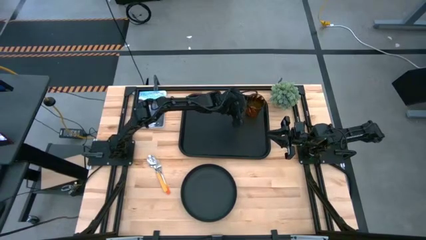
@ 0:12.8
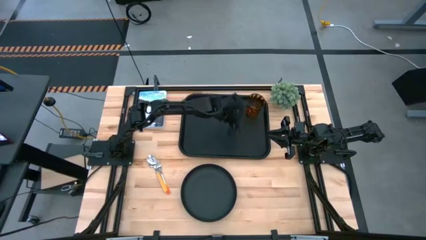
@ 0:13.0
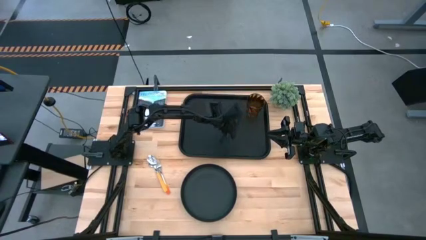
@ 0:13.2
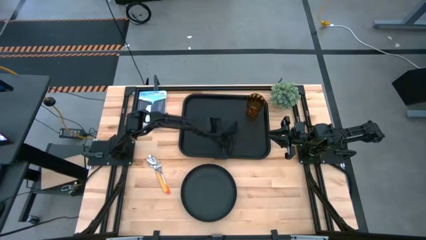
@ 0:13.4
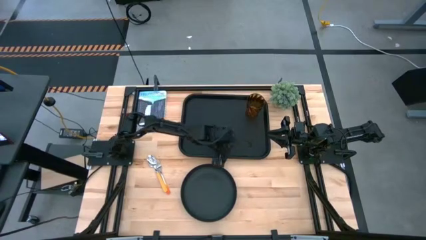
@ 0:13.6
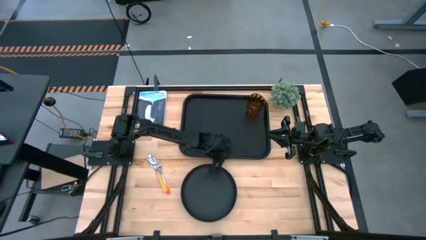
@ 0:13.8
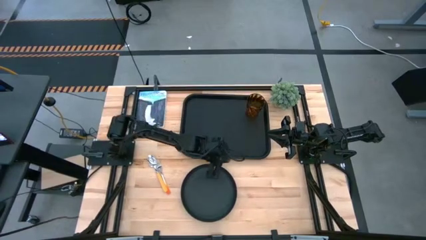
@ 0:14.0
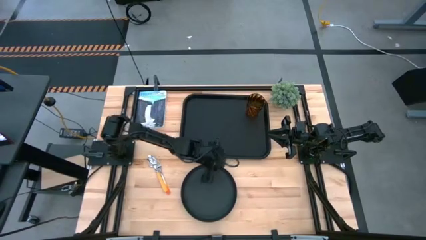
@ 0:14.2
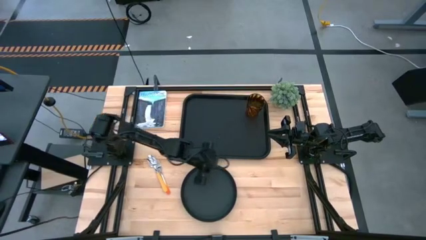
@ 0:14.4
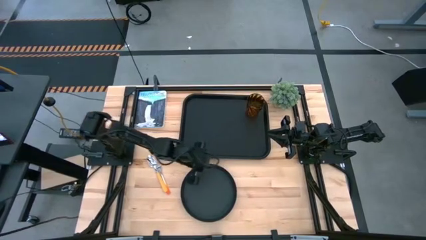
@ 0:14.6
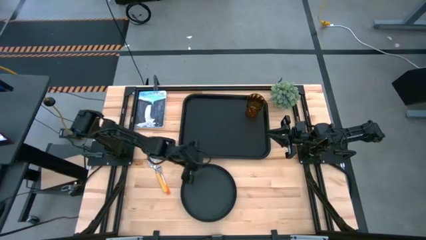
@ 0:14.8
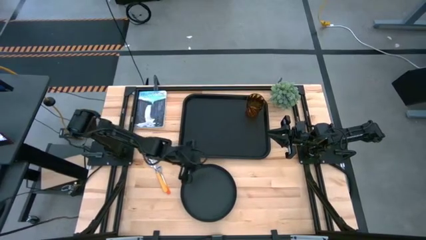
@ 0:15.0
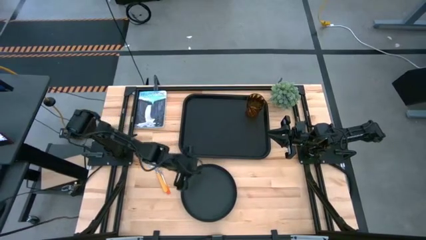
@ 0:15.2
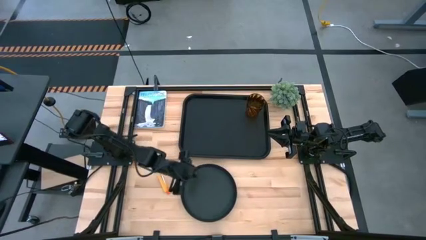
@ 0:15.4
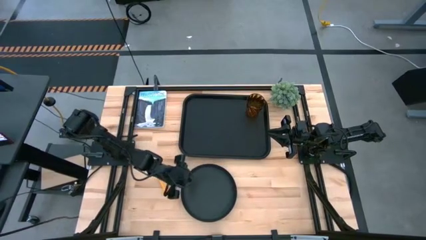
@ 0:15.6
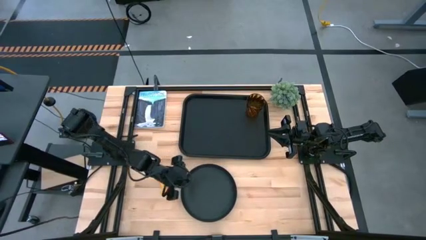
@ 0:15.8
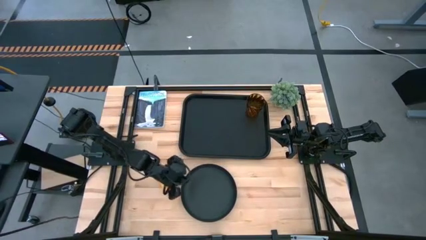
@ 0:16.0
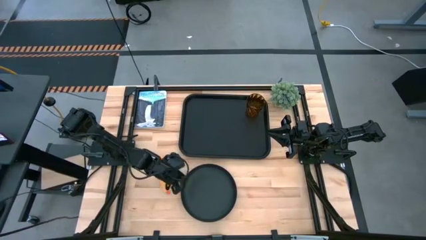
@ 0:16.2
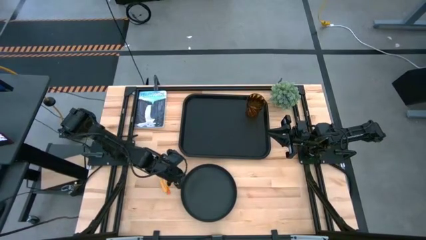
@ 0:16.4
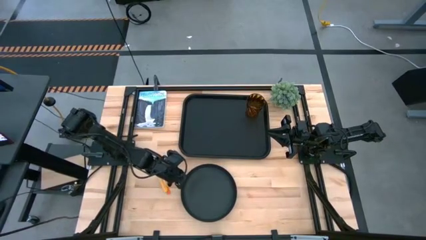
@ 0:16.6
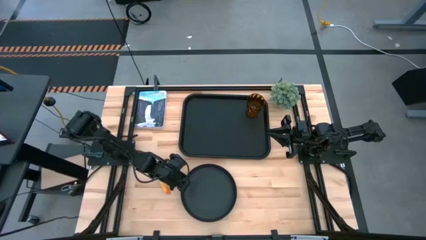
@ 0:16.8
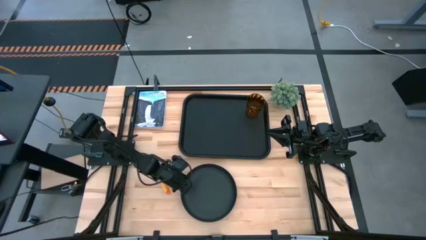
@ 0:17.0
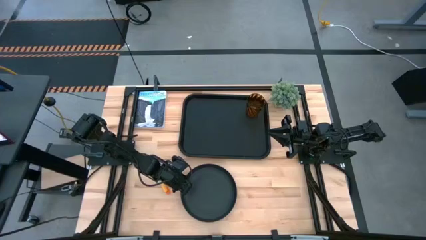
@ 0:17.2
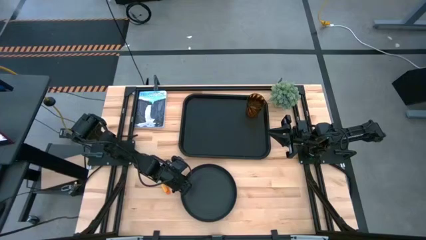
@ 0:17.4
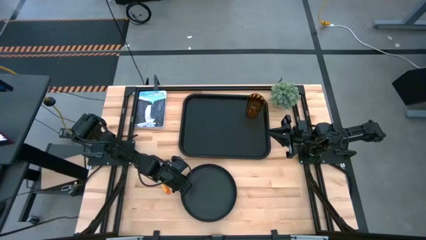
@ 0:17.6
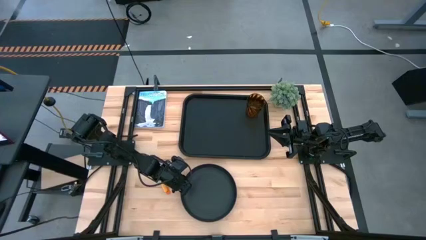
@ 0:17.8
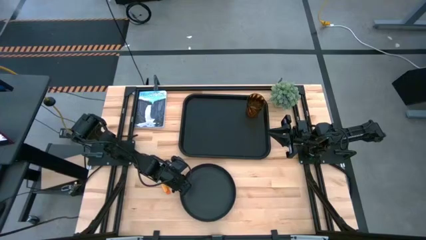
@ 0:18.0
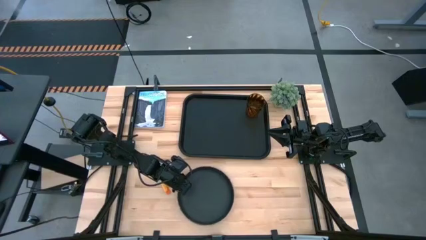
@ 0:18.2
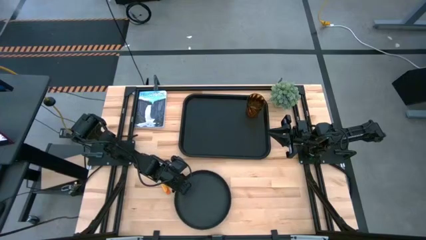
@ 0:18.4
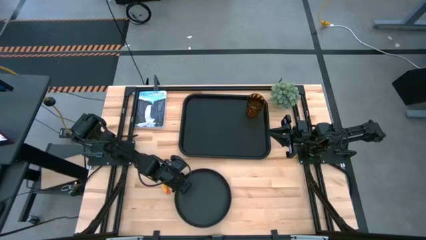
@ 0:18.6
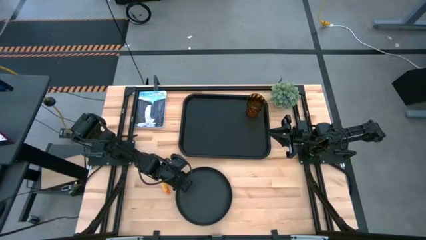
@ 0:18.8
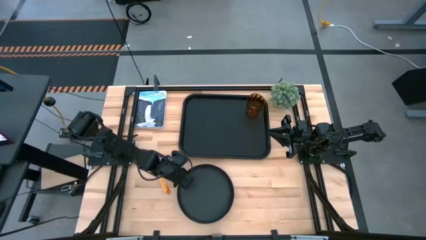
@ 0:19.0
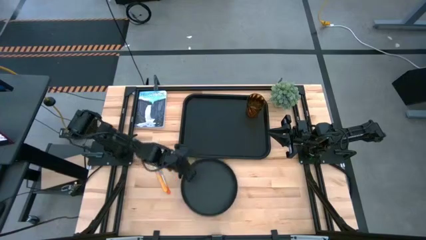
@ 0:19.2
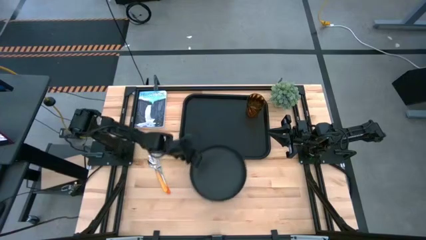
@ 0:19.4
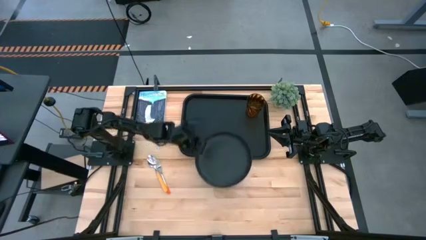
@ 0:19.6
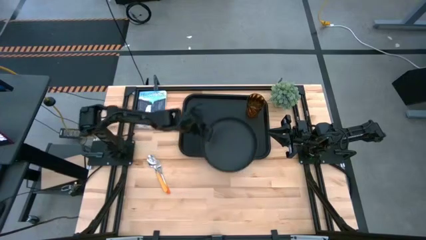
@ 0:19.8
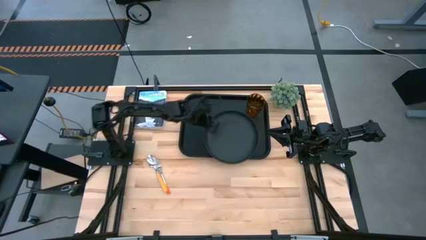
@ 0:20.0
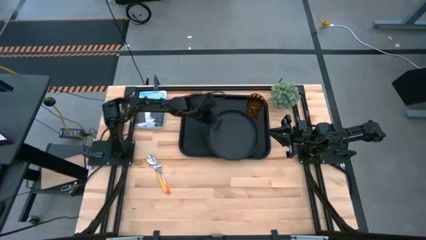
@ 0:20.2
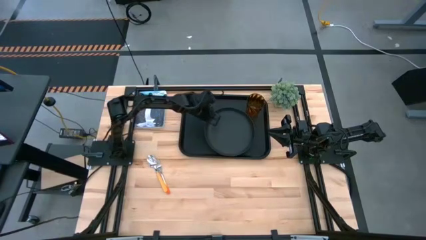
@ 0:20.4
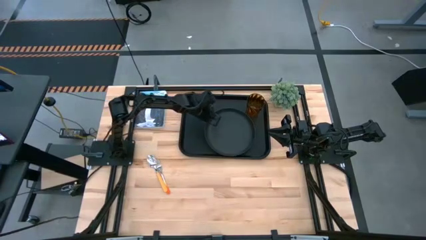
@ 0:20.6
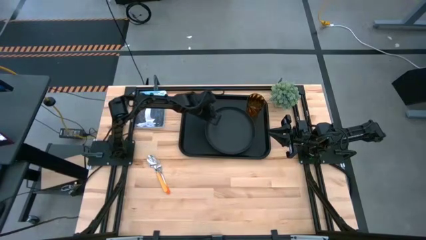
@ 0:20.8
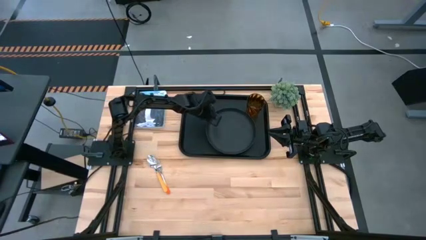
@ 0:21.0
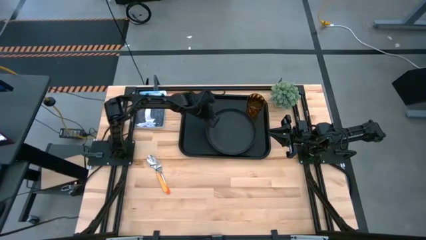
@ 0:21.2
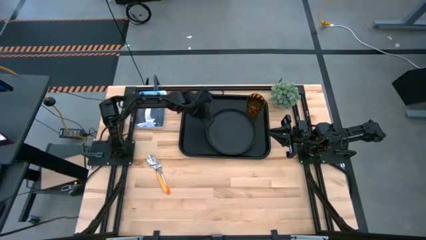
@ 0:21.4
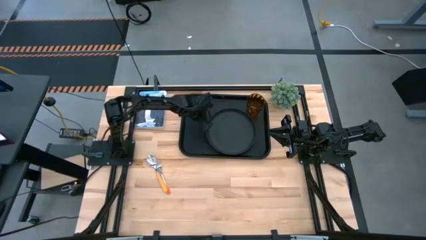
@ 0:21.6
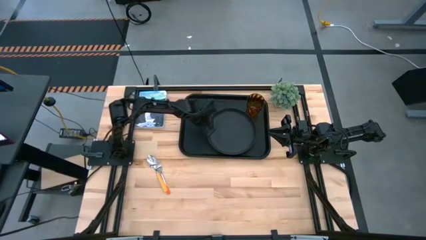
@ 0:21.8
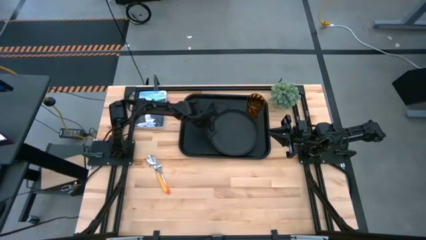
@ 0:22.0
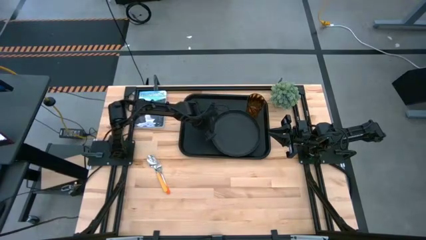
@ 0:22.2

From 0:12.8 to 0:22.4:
Task: Pick and place plate/cup/fork/spoon on tray
Put the black plate on the black serving tray

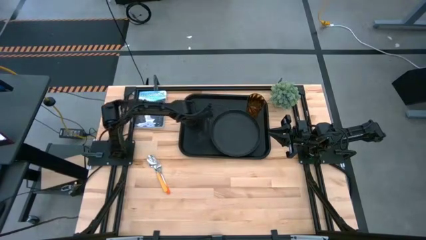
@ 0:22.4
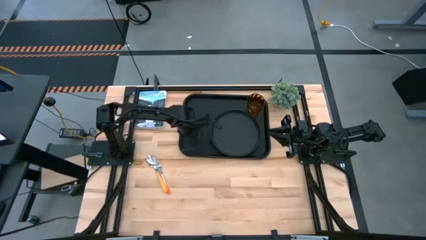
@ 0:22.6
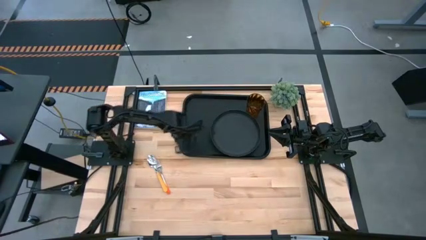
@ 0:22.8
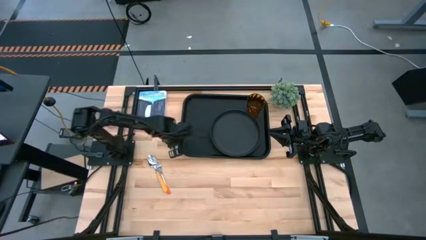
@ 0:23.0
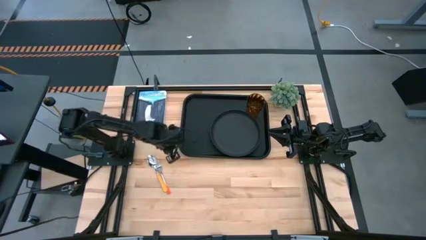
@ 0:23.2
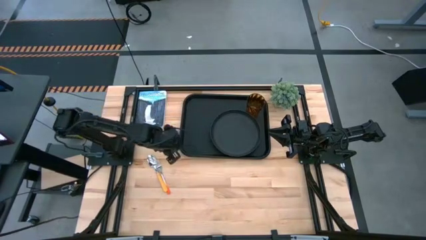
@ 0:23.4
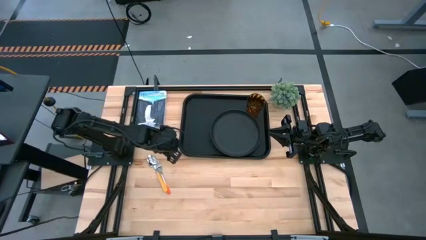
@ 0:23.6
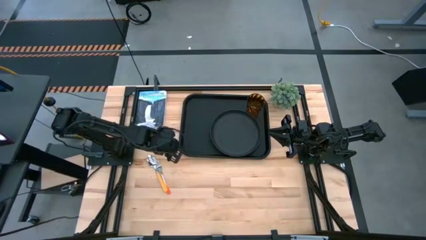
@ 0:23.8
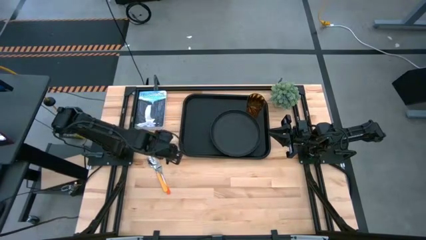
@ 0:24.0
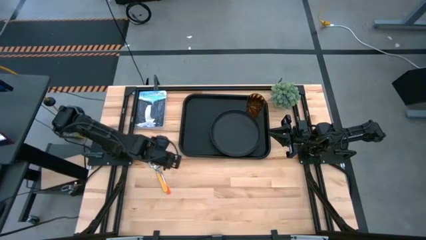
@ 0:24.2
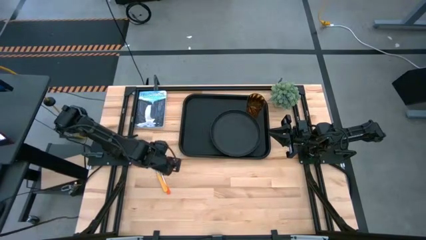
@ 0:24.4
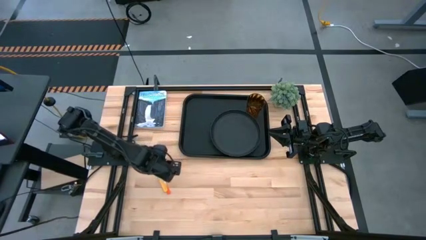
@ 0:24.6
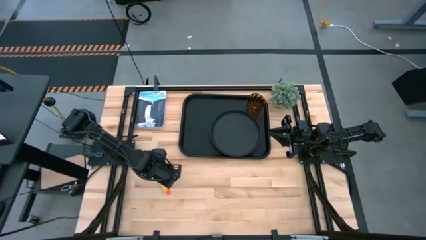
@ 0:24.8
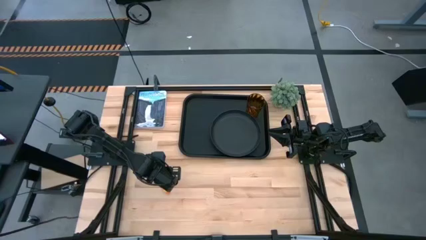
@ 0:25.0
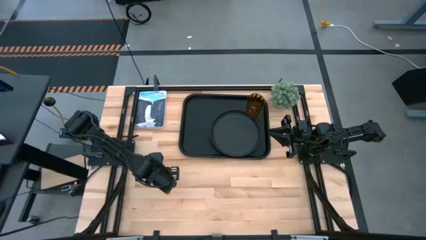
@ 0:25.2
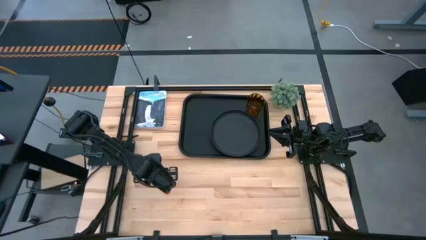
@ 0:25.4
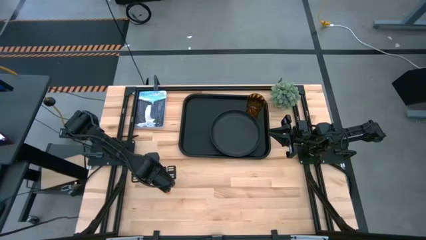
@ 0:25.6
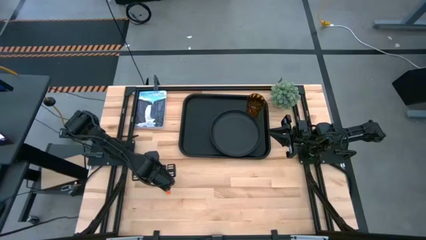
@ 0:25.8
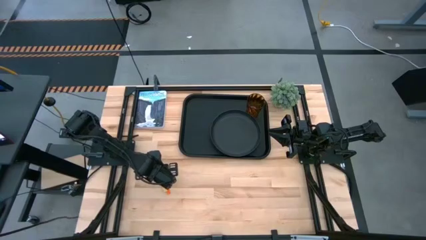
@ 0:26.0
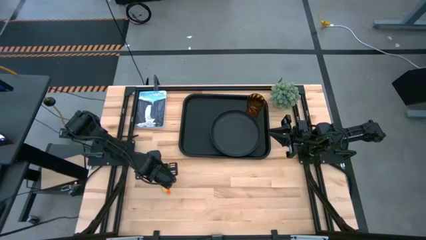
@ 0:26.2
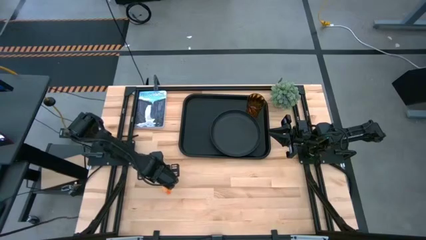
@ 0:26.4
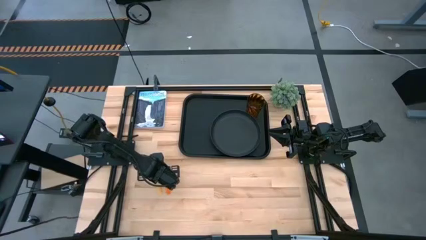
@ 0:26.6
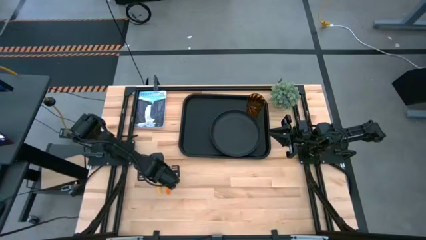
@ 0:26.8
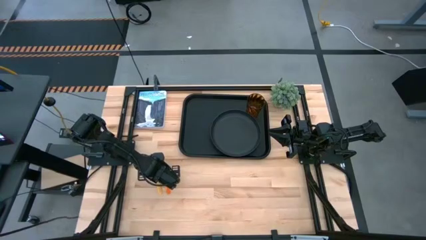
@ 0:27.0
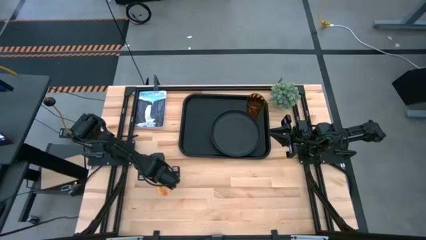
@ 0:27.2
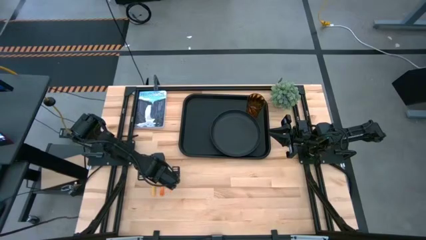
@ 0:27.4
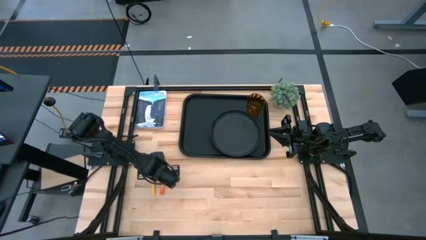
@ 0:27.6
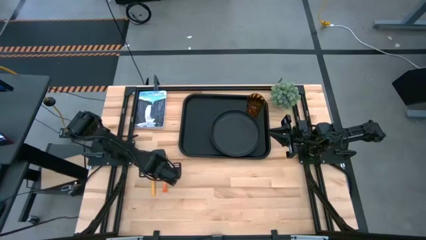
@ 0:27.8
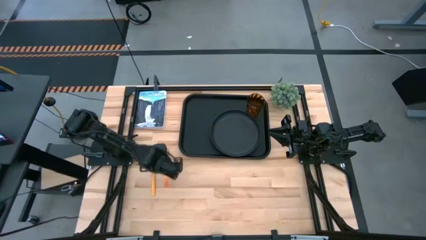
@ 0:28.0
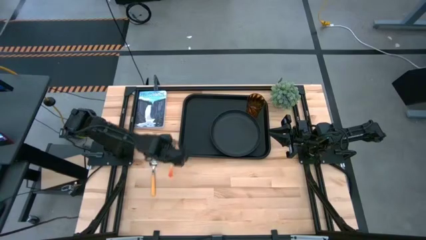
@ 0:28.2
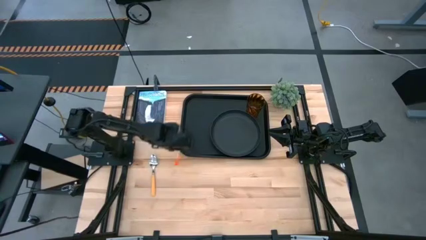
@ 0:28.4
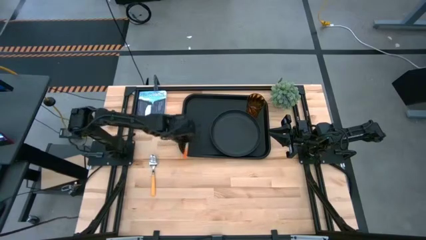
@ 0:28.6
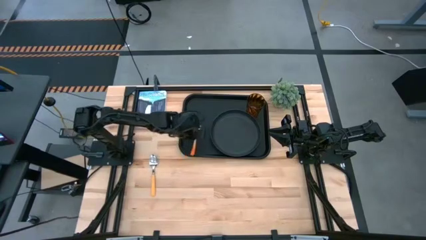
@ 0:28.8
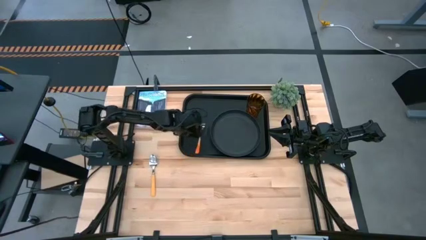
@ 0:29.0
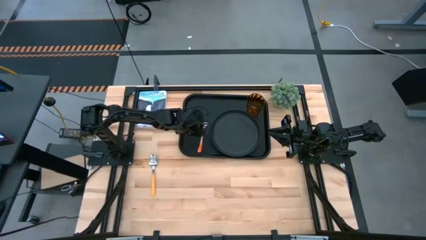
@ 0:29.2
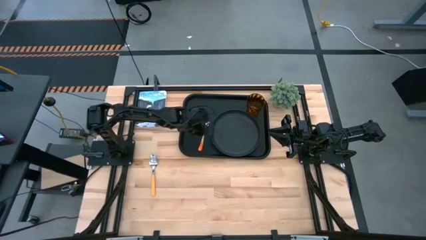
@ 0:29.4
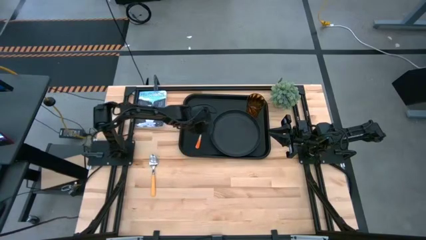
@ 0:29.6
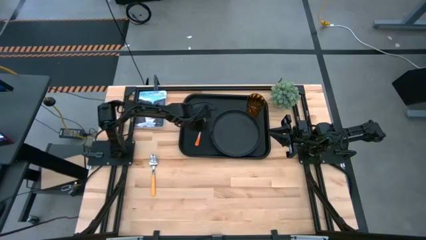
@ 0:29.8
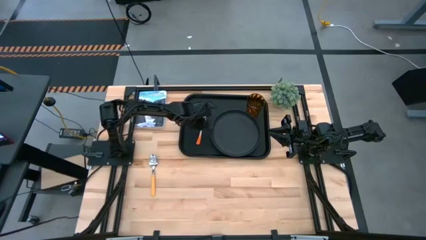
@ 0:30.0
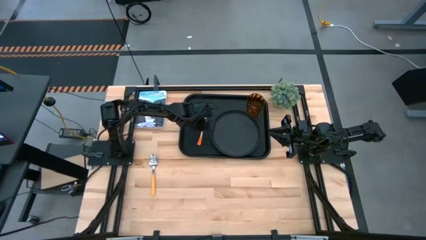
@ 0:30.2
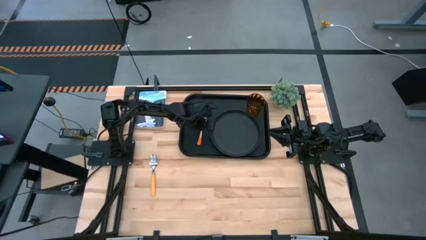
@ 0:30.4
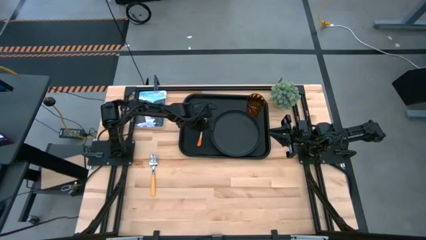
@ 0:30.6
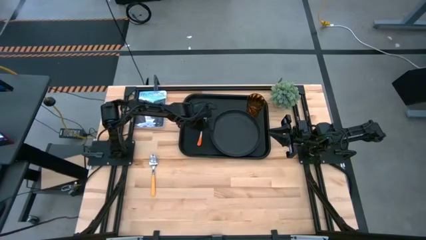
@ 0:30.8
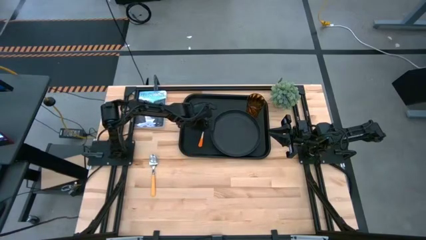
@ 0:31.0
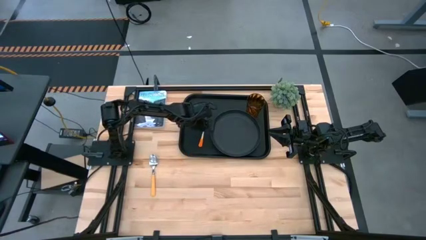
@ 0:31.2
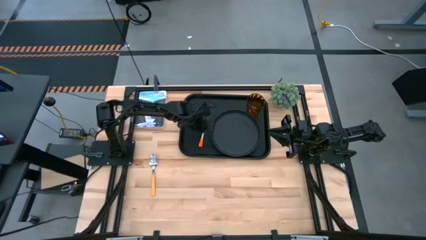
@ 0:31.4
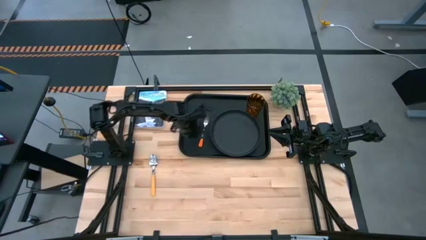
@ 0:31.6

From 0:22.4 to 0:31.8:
Put the orange fork beside the black plate on the black serving tray
